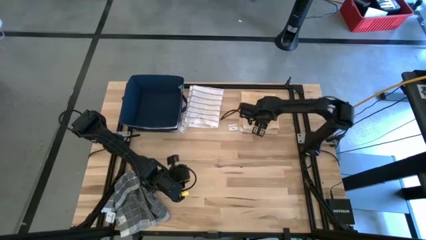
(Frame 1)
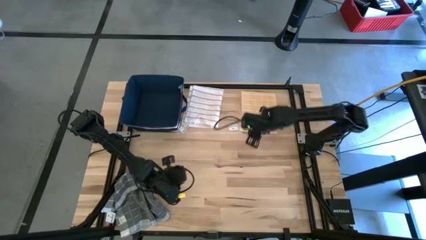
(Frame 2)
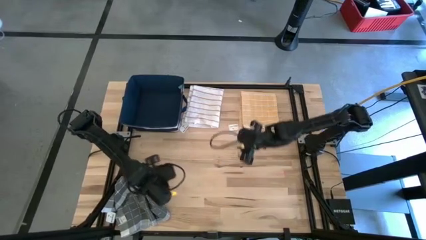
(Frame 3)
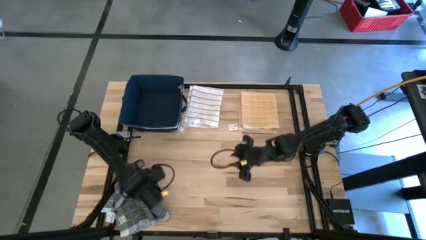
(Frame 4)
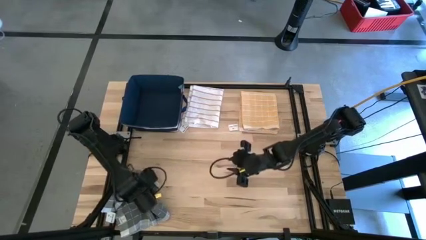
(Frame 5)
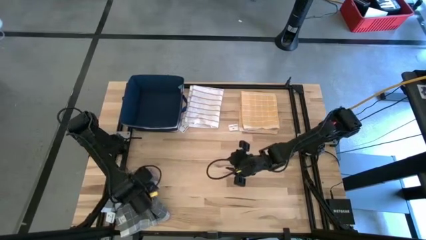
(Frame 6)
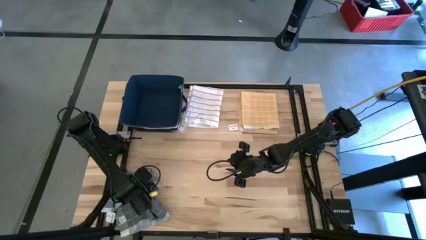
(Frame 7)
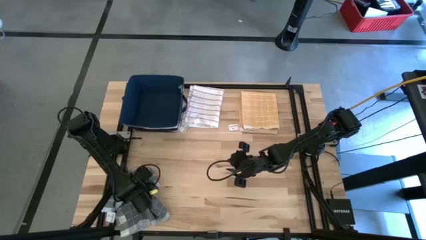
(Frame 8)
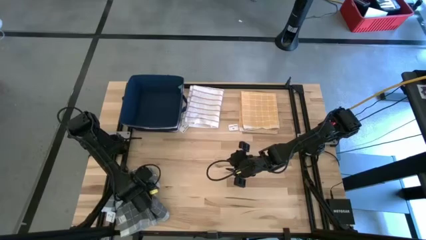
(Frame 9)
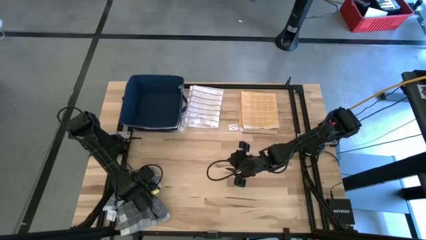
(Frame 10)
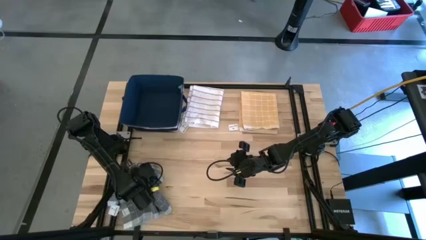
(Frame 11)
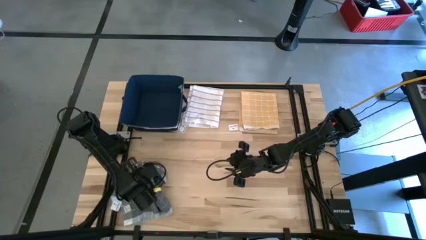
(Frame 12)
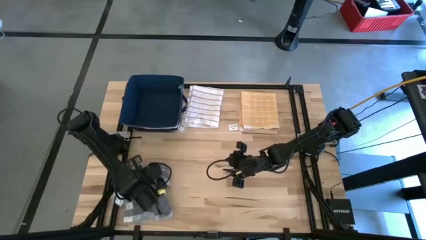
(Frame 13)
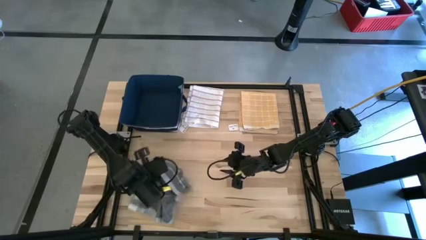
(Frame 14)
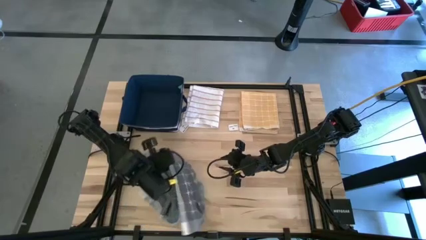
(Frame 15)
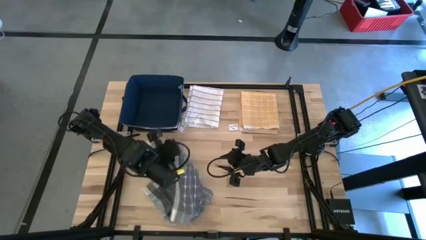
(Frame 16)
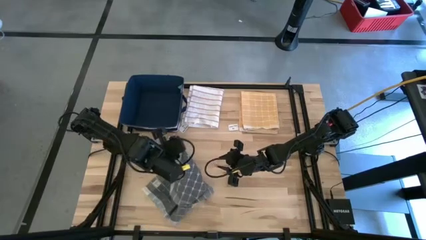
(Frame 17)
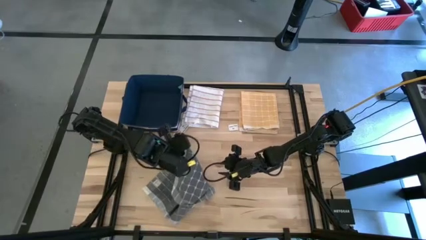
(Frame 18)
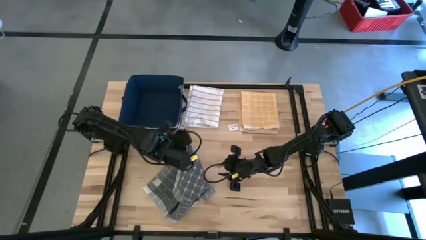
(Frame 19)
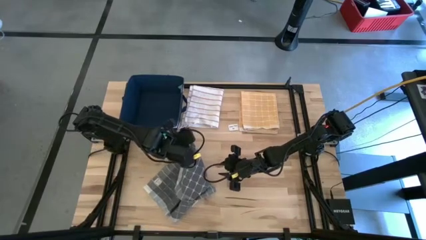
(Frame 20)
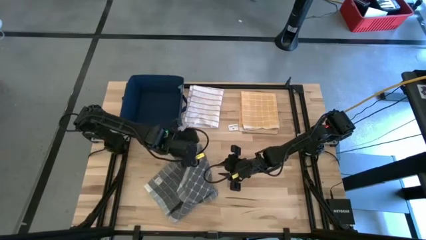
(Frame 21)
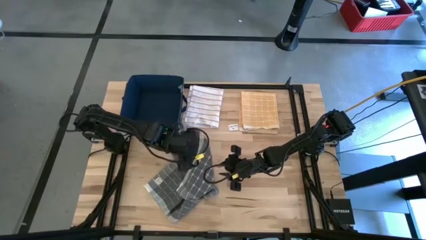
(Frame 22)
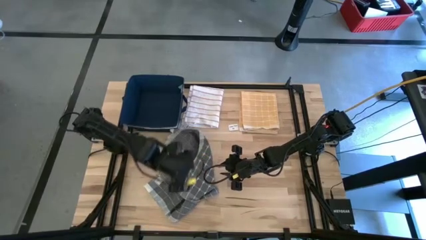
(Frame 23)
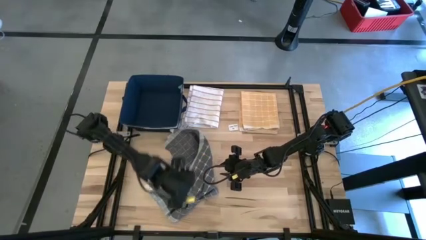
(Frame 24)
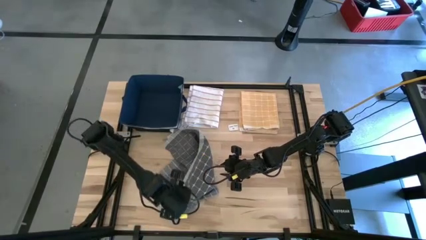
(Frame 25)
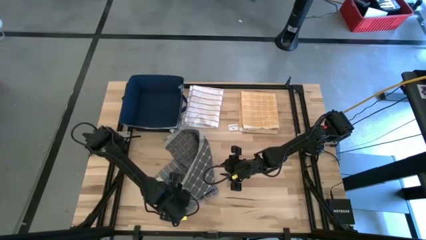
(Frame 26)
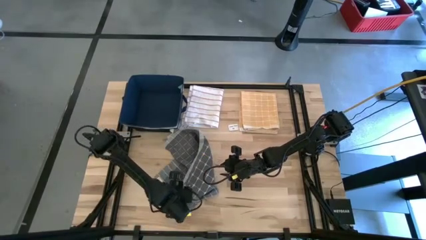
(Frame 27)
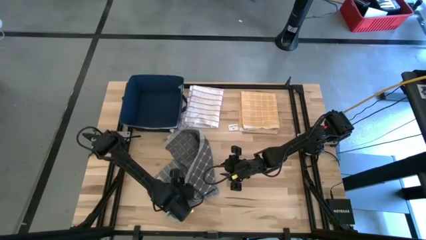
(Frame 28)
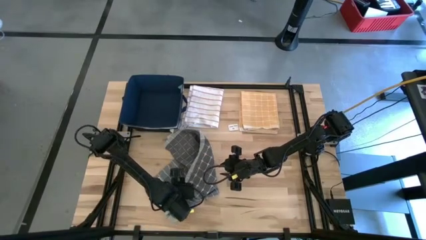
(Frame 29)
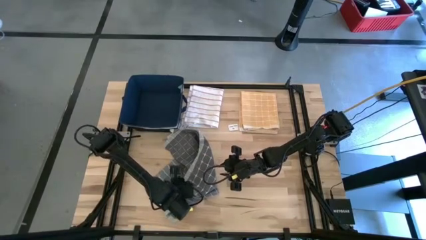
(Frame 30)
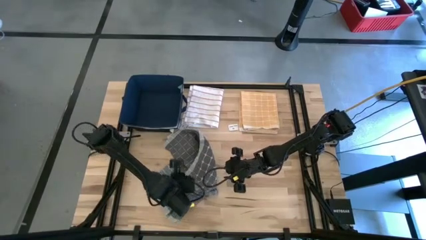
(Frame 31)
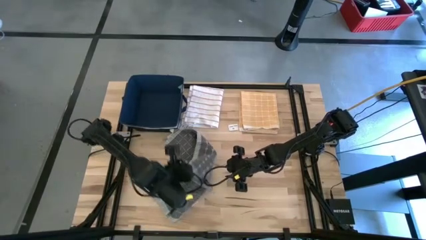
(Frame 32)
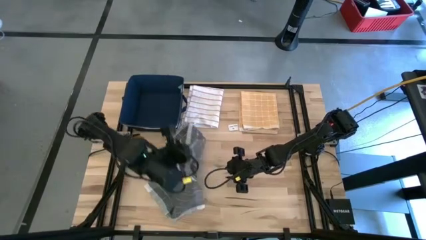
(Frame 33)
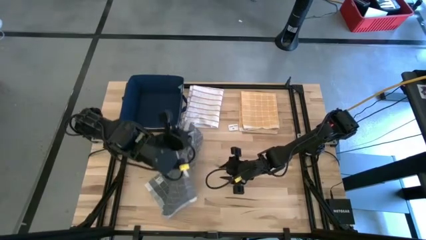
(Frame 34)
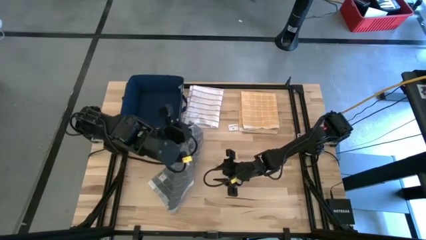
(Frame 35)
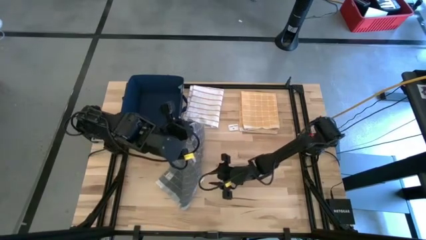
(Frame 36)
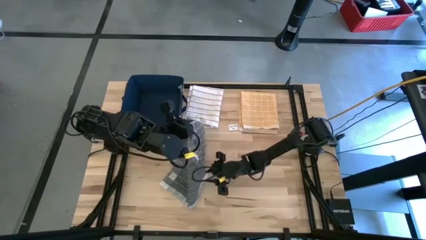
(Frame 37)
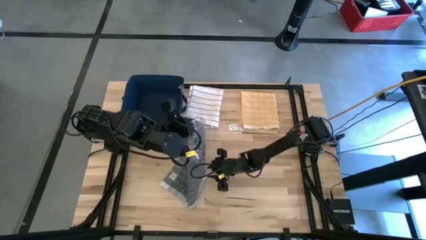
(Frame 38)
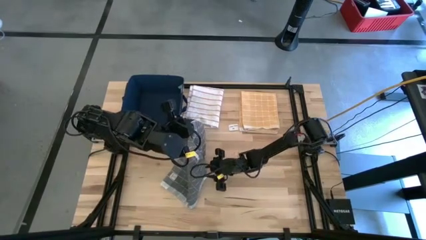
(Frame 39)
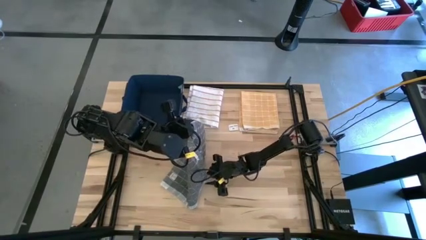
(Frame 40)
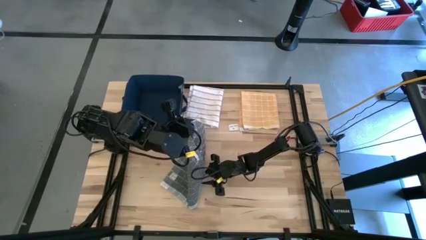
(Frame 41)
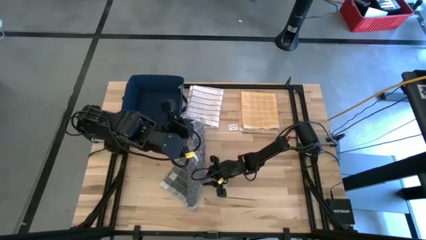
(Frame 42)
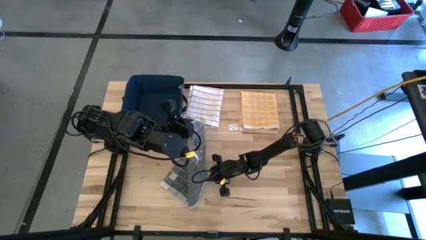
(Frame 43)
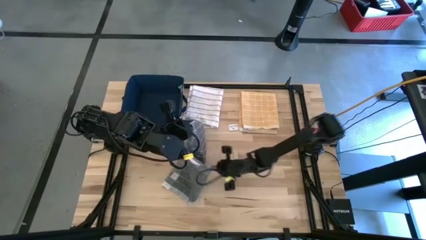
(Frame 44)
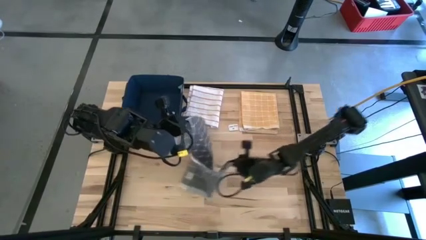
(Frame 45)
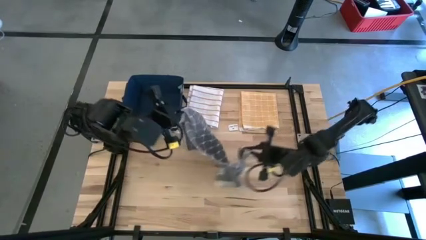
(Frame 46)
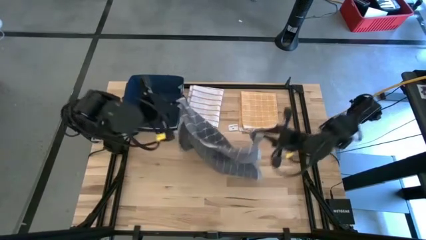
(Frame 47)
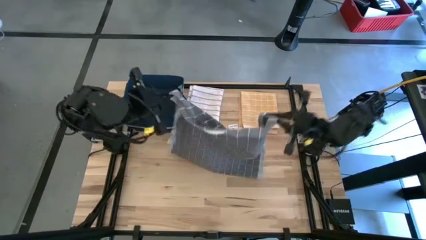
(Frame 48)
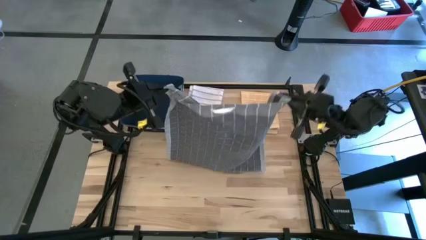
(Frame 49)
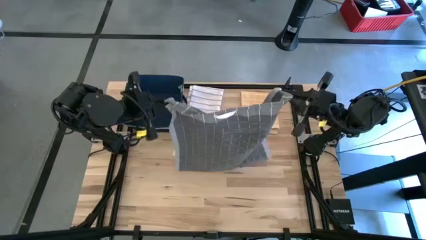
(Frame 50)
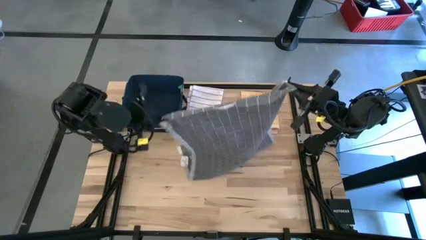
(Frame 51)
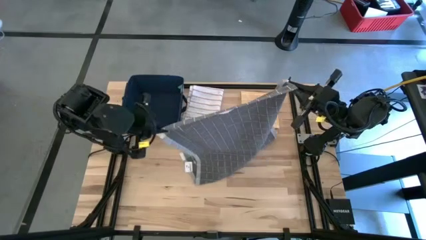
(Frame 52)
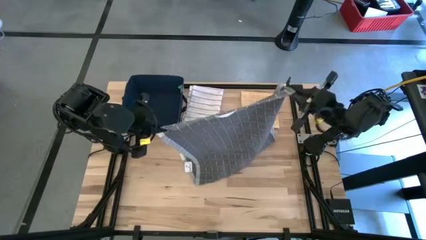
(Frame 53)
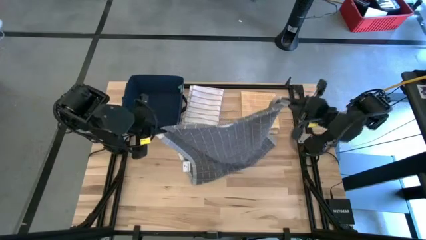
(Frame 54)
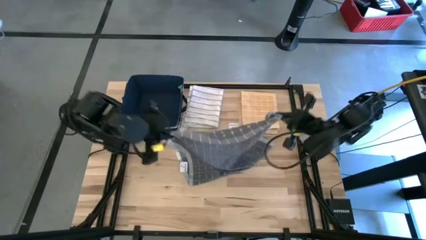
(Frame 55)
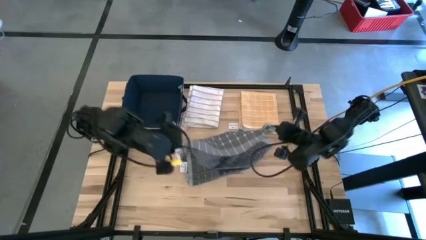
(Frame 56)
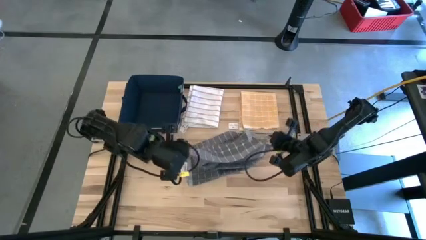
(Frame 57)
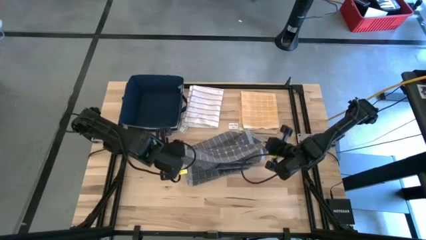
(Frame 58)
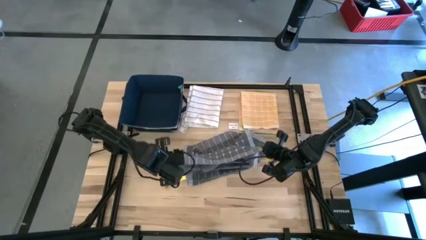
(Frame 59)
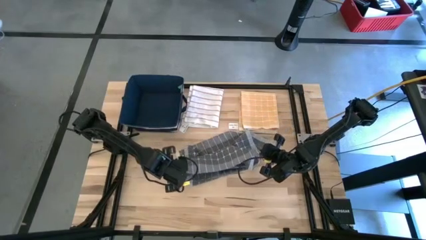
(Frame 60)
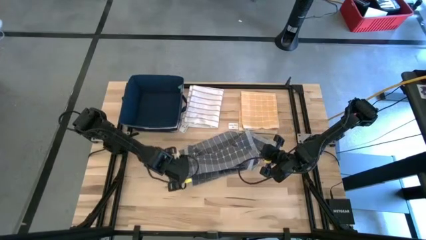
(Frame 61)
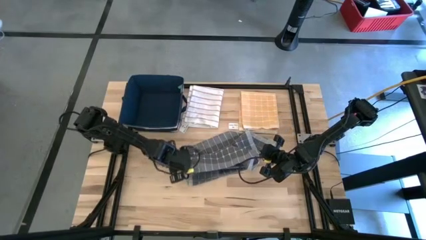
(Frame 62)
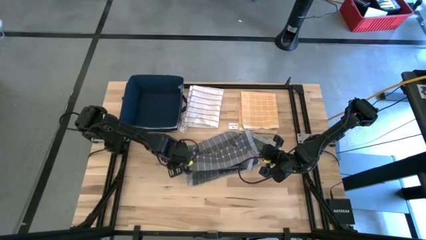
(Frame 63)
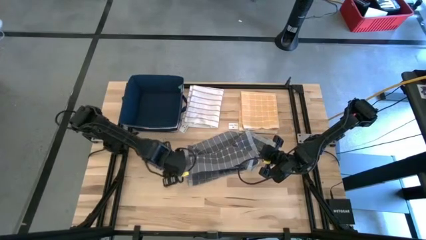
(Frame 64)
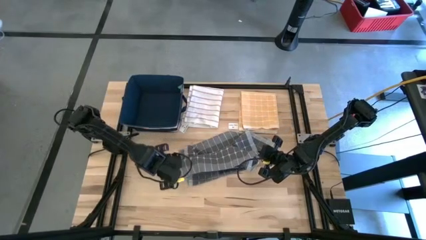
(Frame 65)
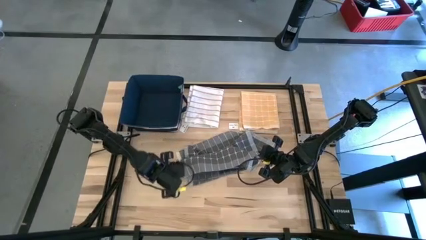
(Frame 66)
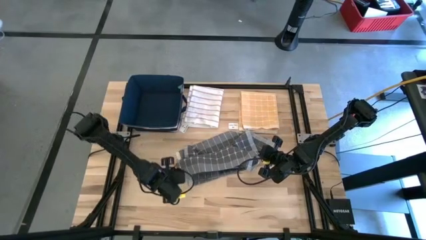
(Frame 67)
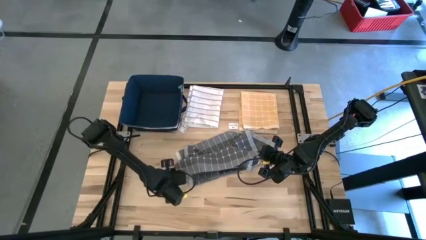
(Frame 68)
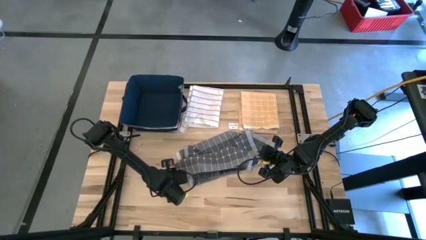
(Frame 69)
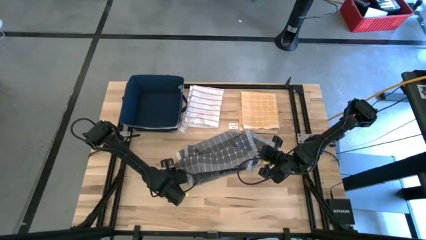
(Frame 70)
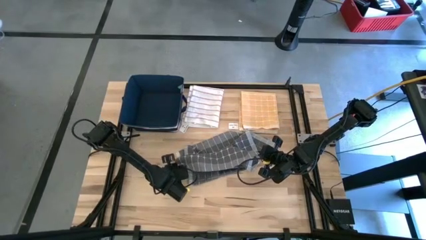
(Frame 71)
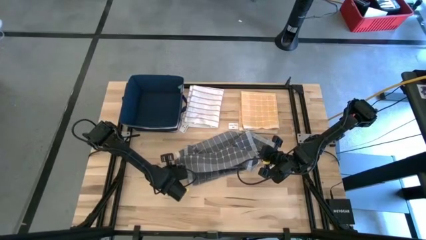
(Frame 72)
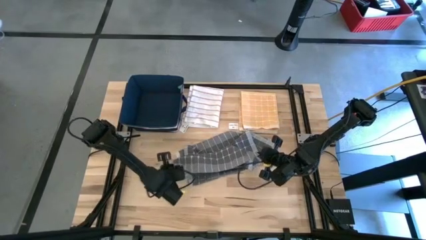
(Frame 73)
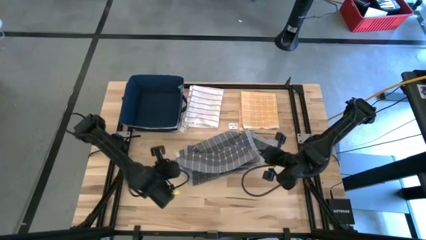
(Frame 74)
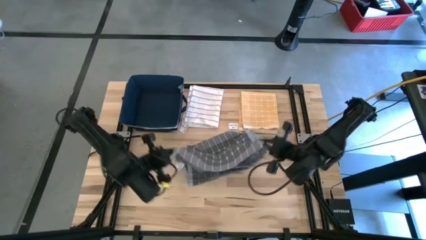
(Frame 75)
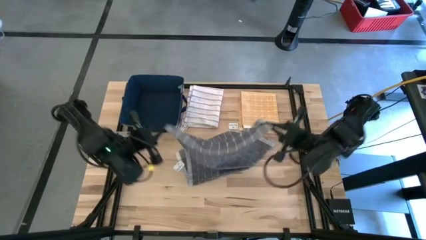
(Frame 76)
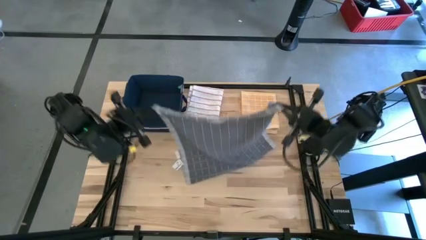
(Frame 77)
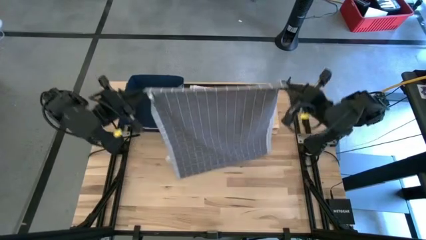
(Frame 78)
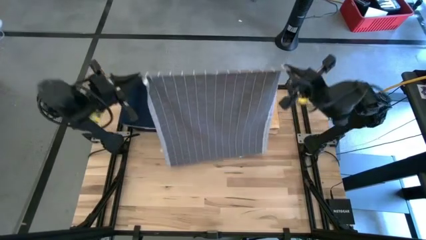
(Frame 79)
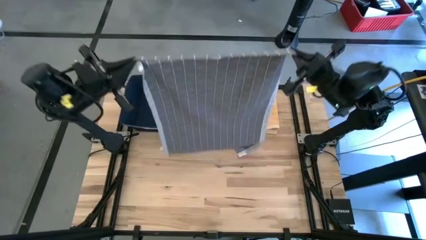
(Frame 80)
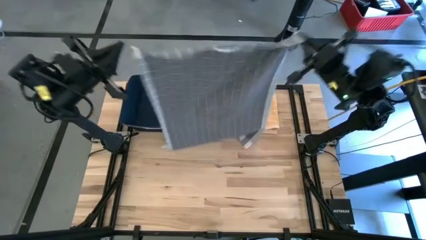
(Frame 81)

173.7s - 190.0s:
Task: Fold towel
Fold the gray towel
